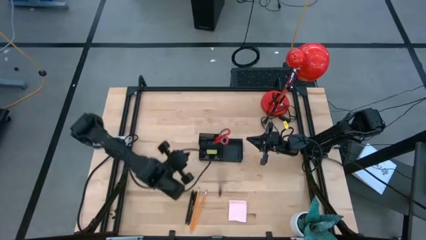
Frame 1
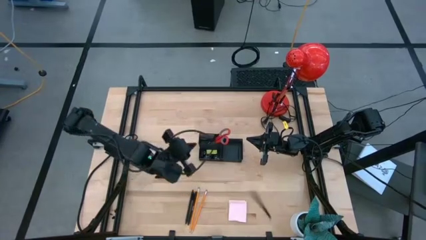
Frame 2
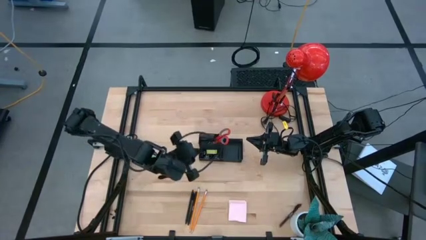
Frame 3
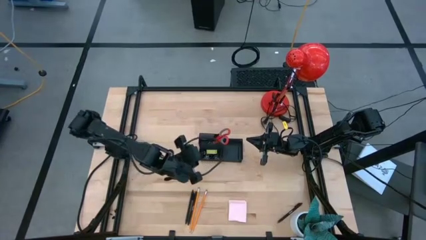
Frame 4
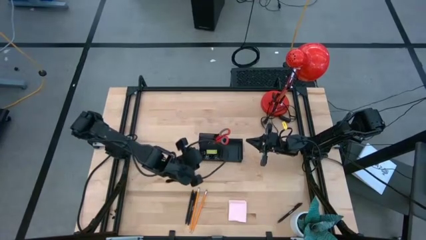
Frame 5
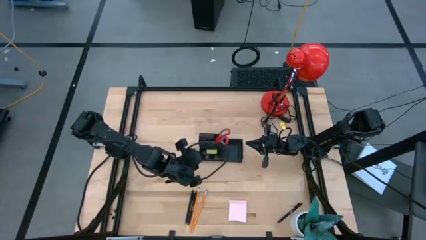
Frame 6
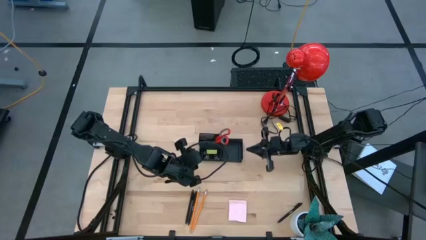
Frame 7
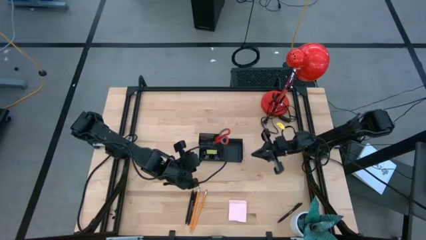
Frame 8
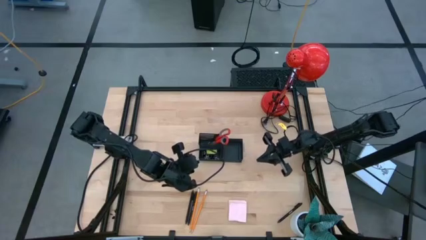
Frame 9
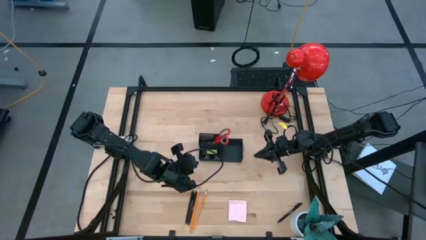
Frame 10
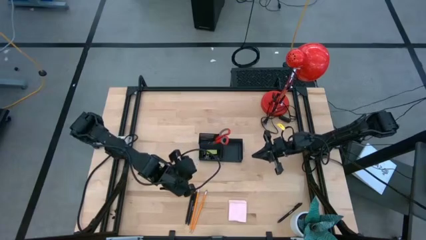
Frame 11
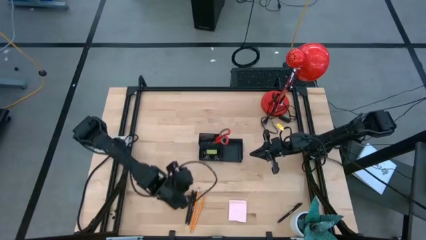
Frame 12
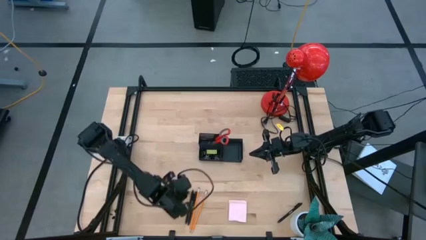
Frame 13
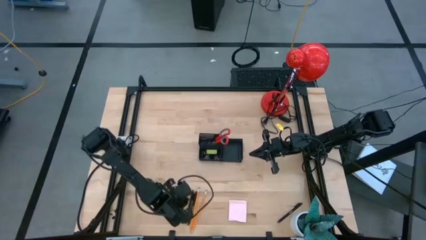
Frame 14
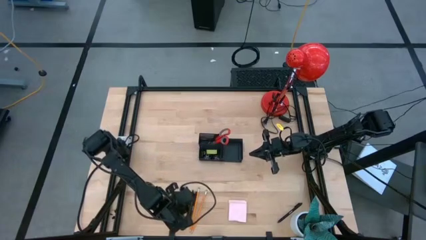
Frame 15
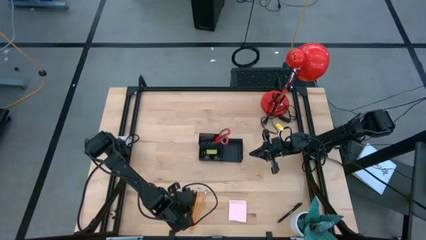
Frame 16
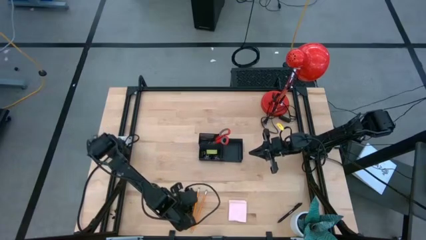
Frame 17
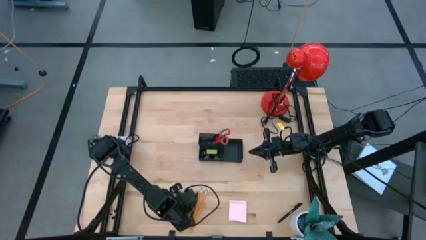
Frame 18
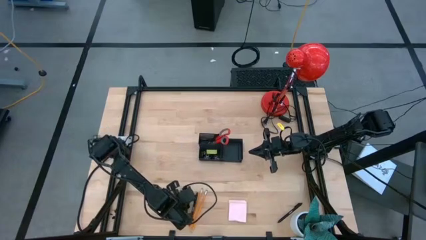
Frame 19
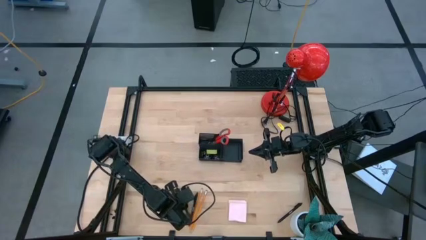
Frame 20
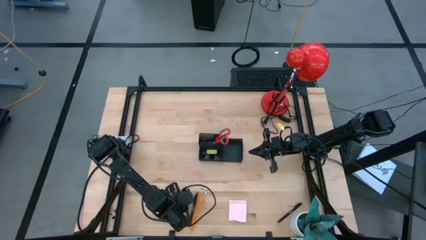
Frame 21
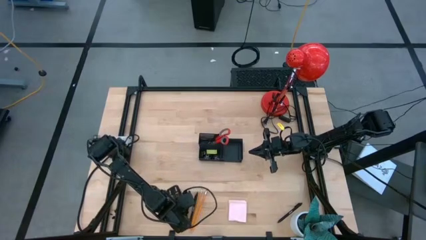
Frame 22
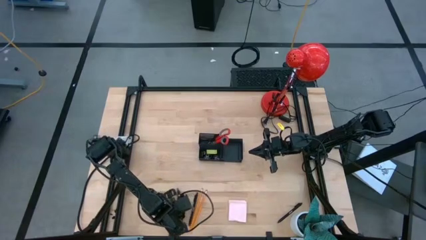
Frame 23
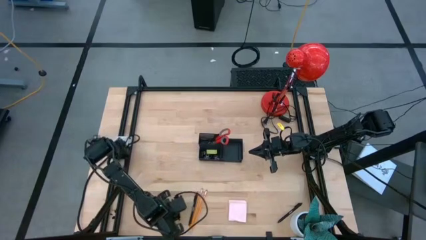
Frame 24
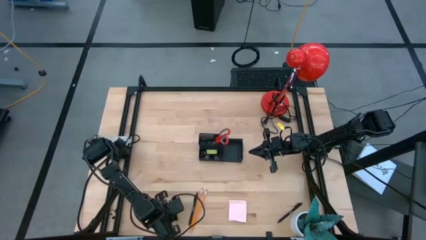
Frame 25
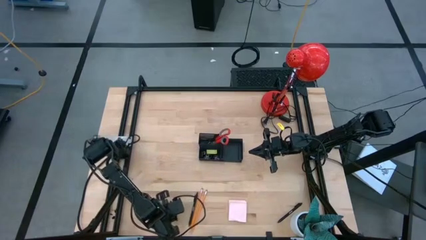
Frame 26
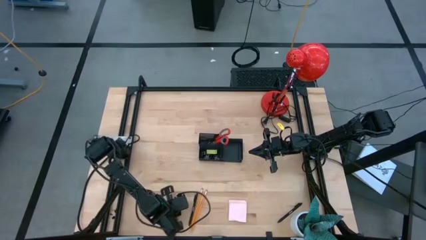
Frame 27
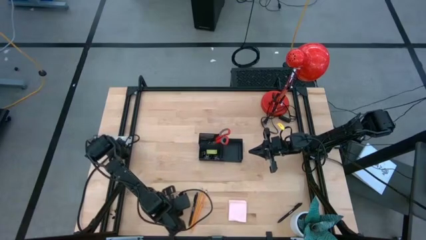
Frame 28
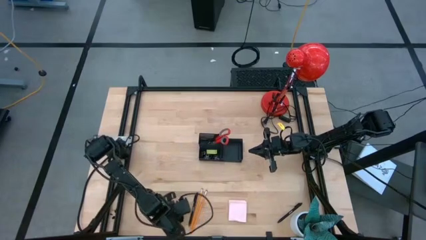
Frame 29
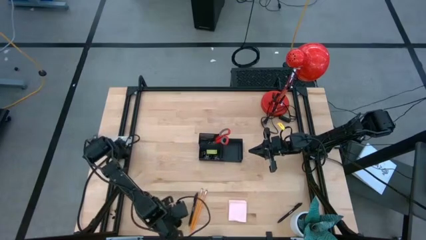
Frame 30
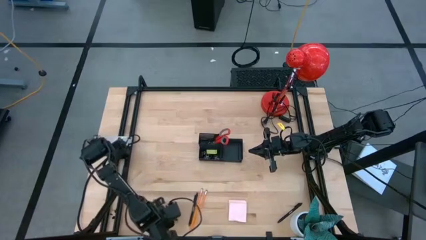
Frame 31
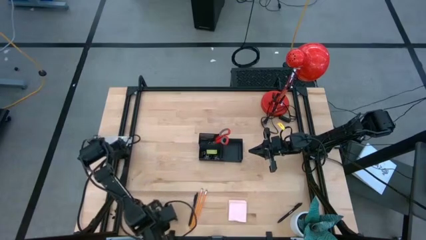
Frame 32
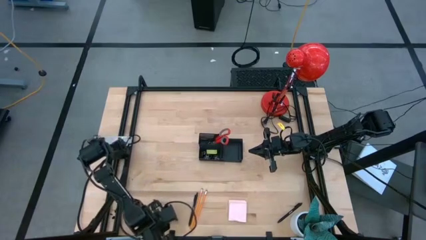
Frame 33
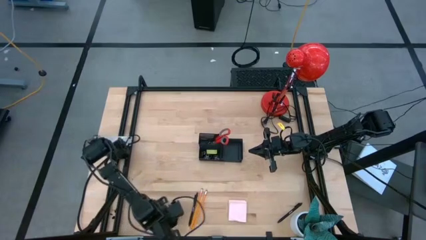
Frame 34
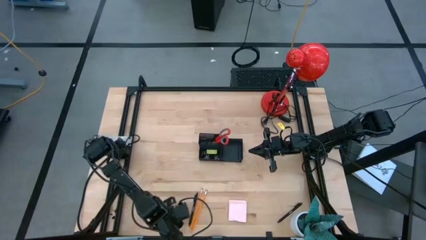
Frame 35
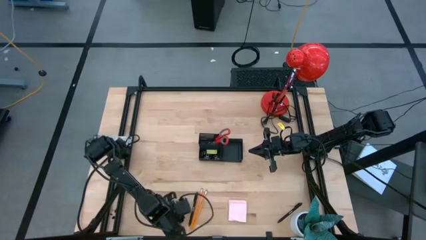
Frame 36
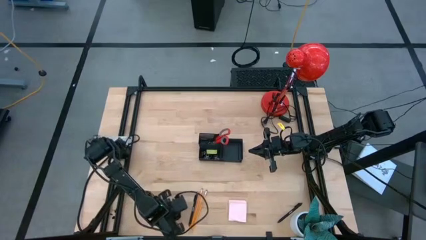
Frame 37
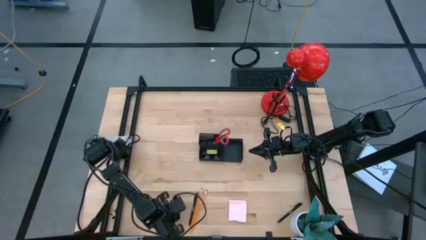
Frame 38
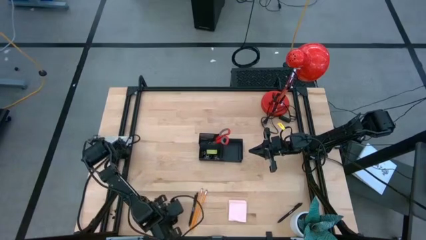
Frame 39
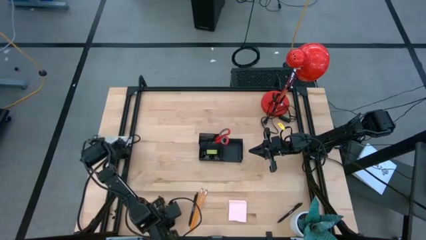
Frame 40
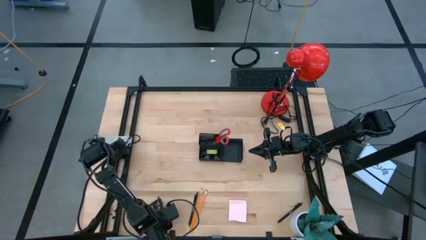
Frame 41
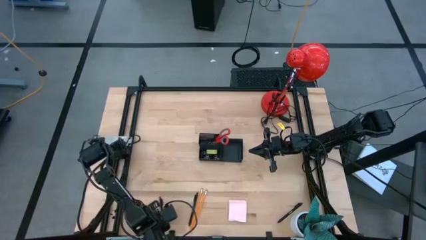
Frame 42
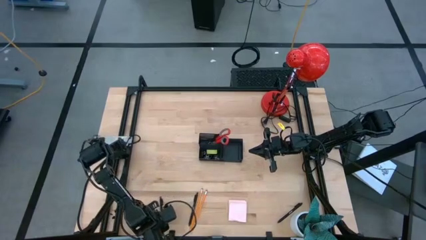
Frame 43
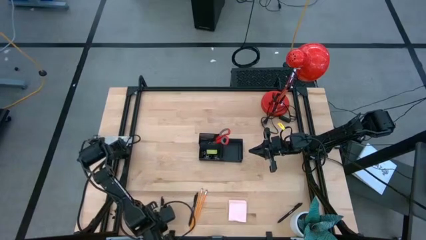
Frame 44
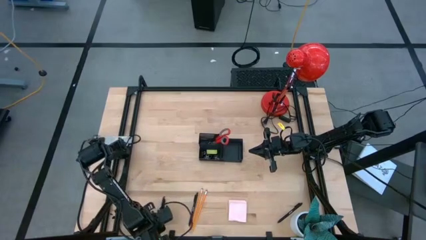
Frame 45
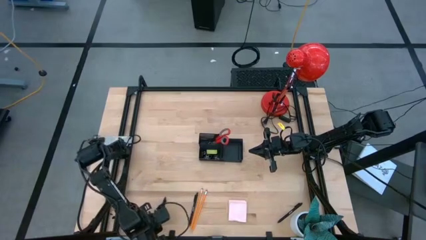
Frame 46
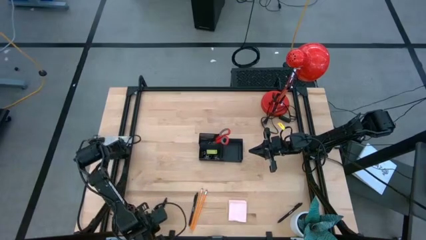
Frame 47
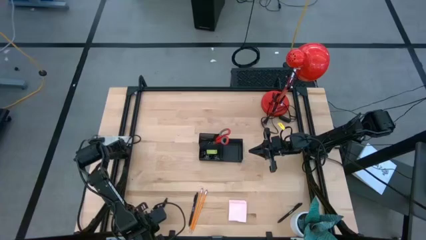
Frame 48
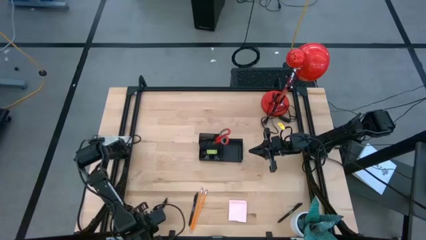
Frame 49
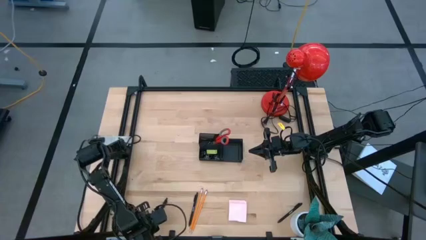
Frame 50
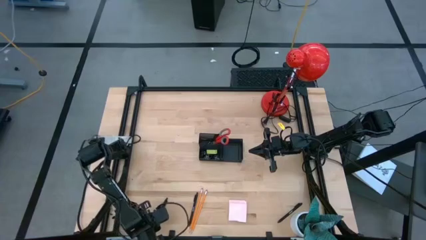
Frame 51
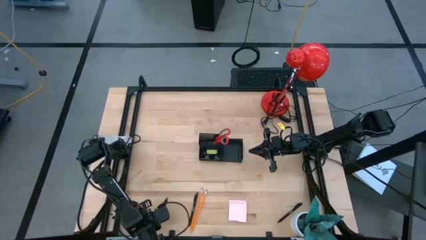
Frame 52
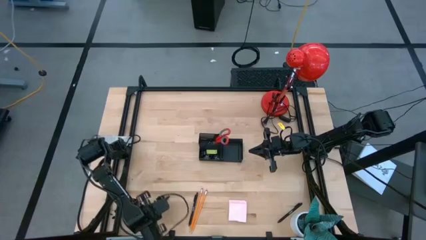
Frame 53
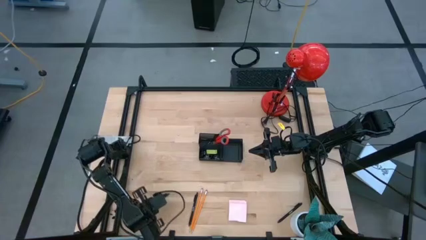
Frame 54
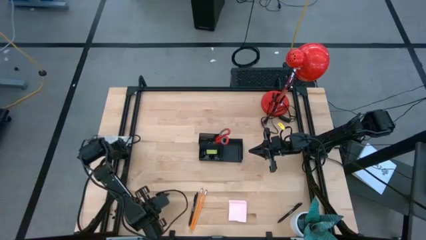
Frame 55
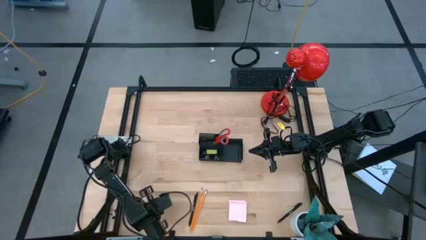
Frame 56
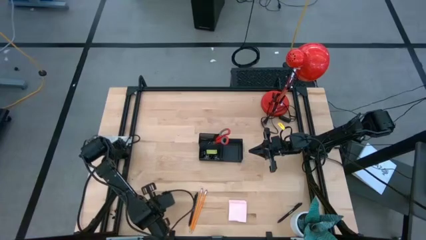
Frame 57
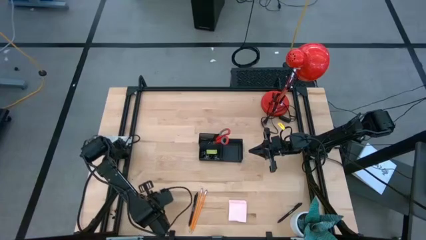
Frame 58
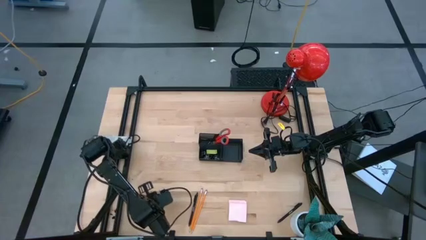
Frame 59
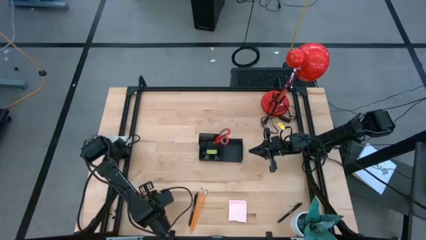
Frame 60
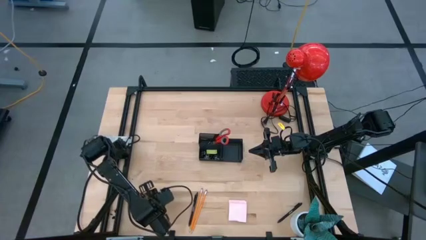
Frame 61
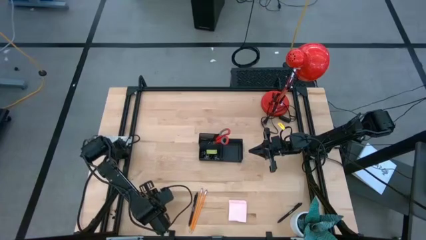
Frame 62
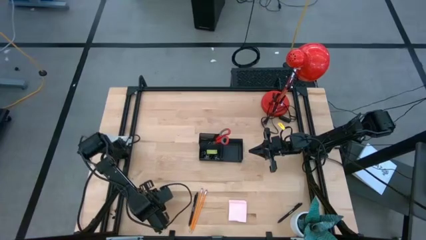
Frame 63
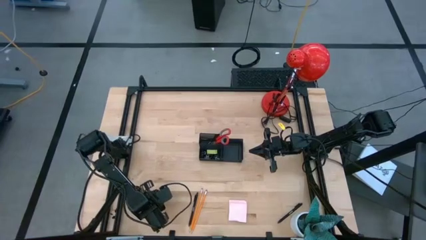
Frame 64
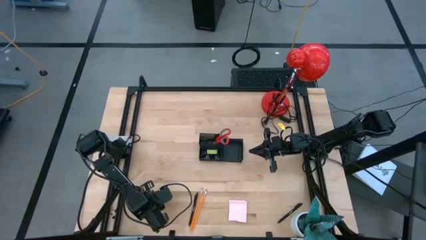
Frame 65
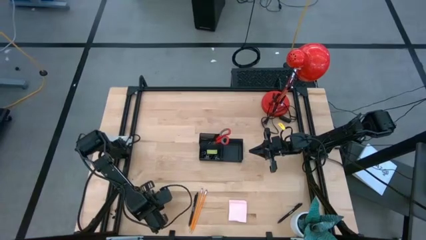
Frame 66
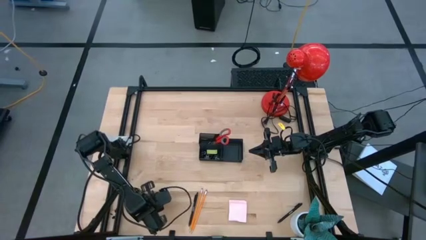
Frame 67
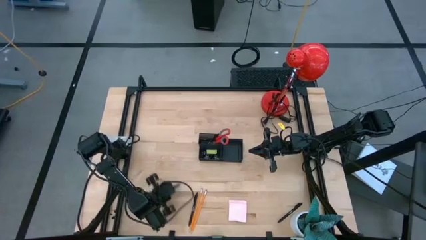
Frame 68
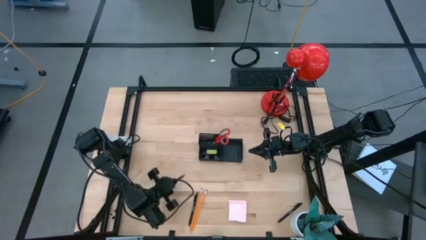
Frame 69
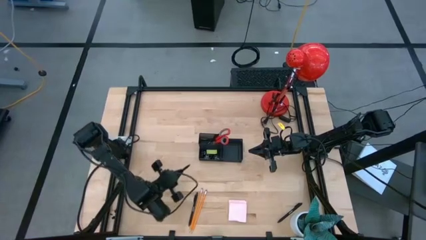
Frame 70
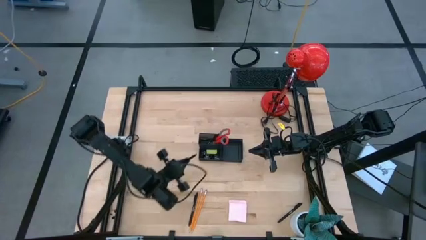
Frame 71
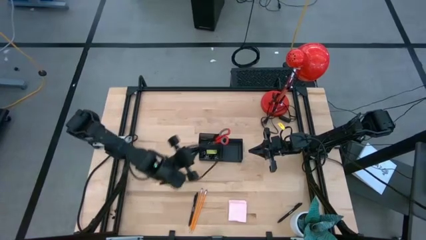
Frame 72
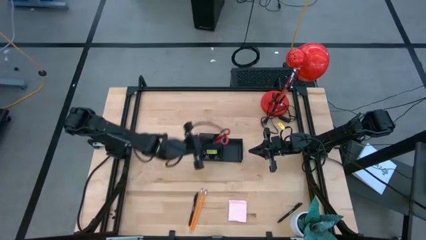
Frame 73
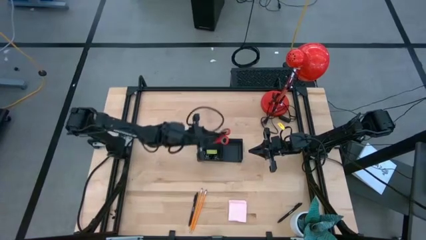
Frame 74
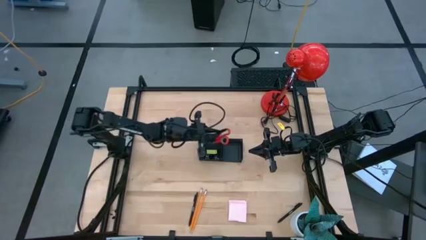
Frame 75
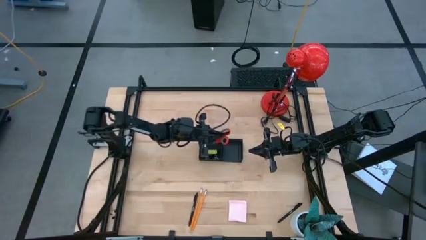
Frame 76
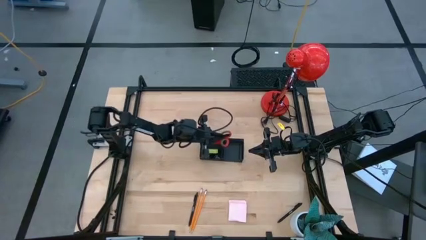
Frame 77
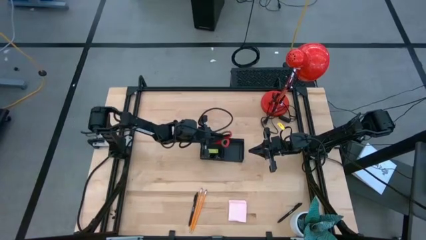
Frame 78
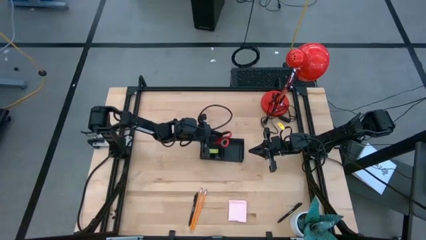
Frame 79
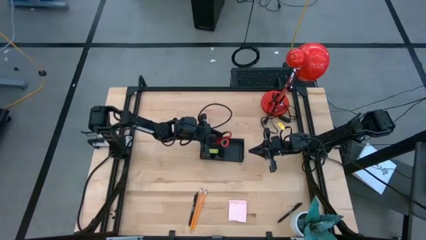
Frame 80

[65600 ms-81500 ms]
Task: Pick and place office supplies into organizer
Put the black pen into the black desk organizer

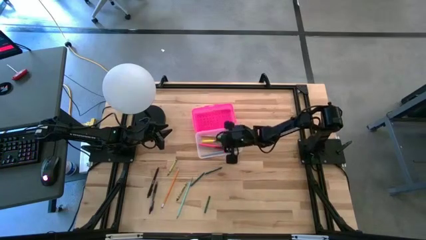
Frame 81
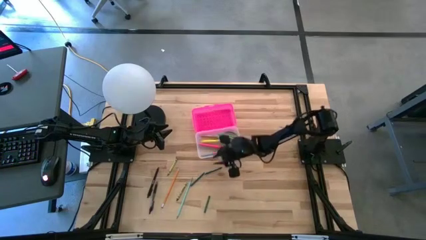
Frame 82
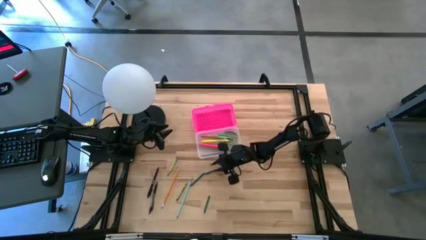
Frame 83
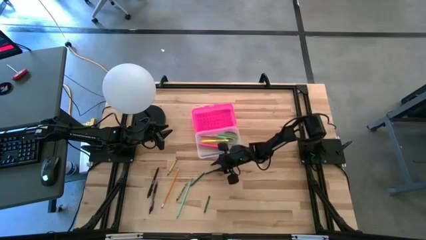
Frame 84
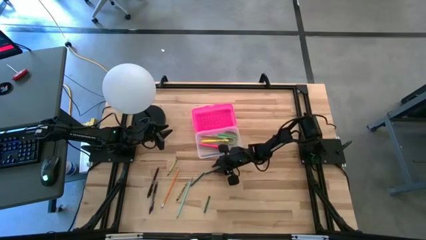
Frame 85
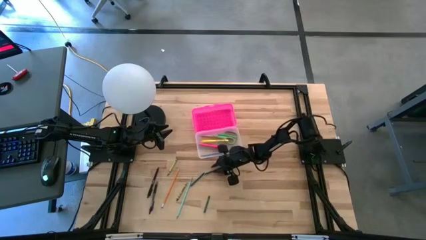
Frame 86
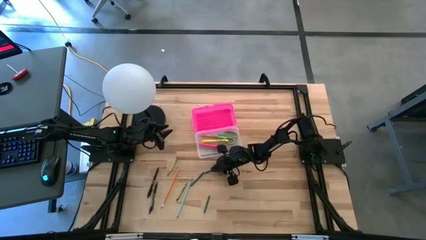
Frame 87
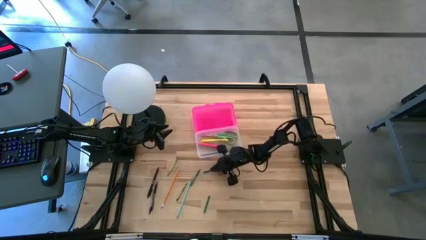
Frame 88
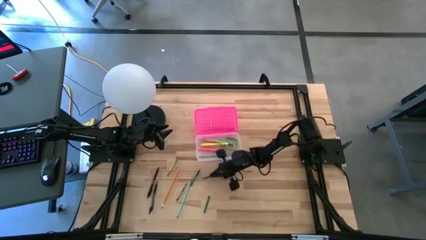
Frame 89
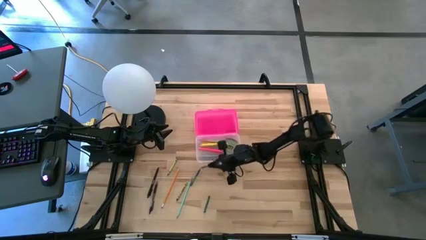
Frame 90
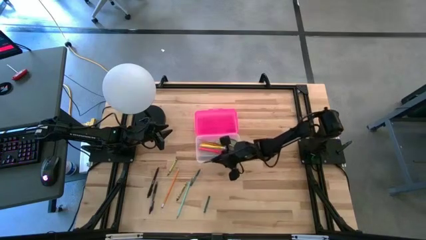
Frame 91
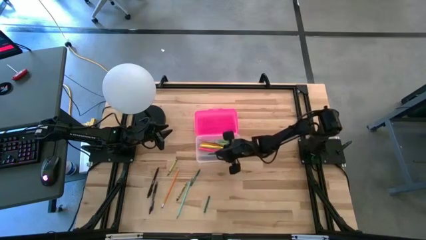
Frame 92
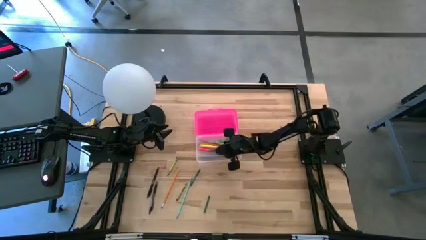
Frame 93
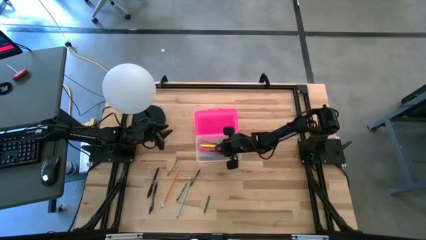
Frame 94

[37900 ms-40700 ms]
Task: Pick & place school supplies into a supply box
Put the right dark green crayon into the pink supply box
